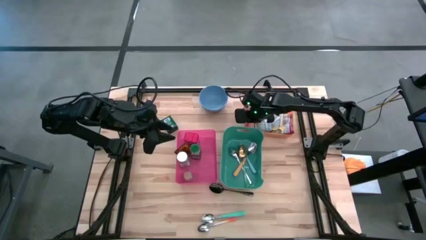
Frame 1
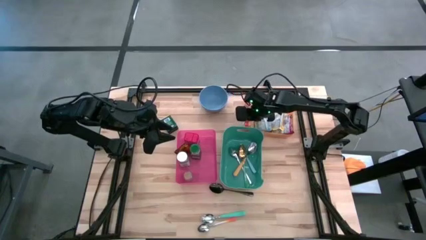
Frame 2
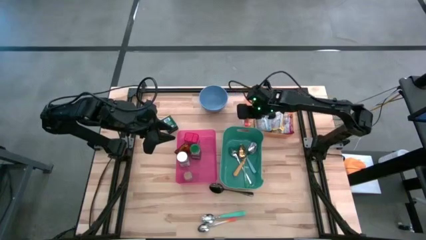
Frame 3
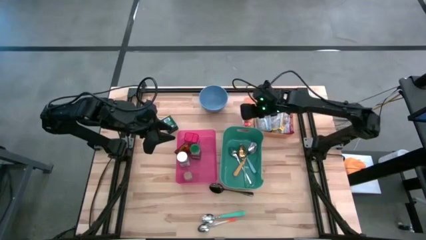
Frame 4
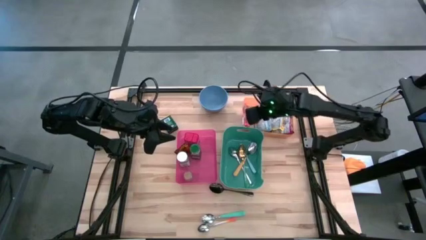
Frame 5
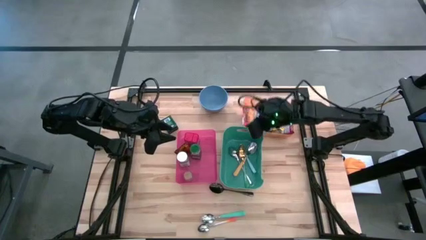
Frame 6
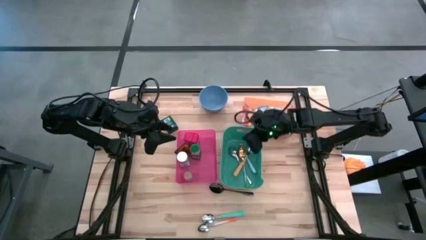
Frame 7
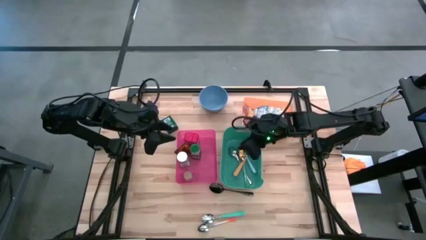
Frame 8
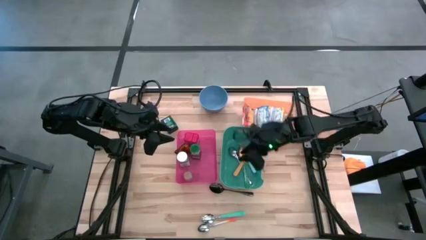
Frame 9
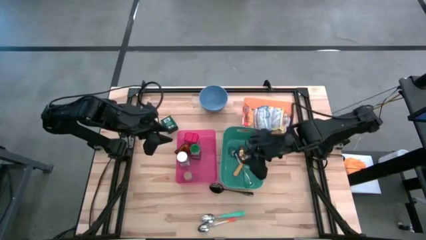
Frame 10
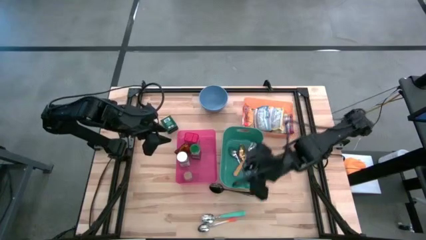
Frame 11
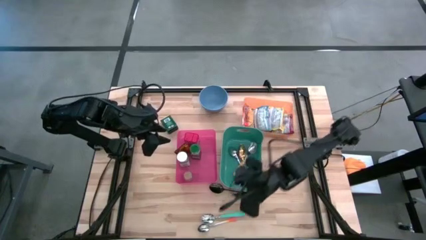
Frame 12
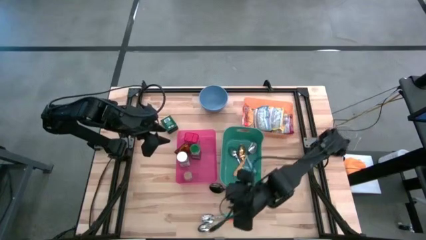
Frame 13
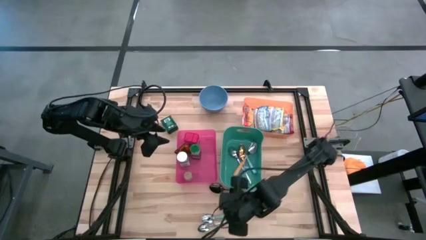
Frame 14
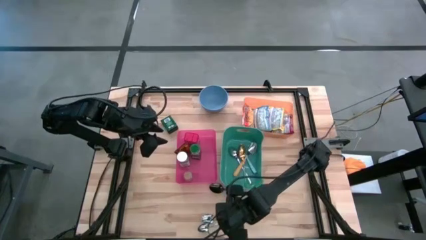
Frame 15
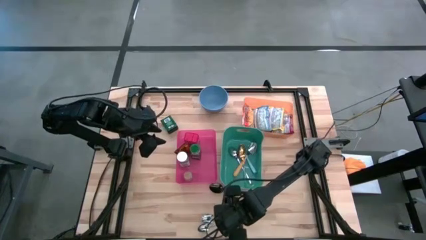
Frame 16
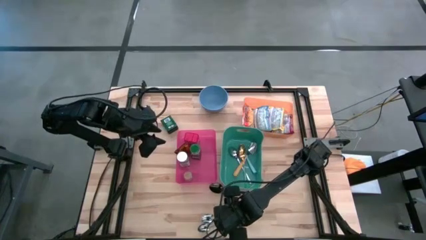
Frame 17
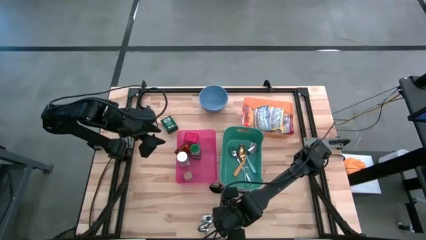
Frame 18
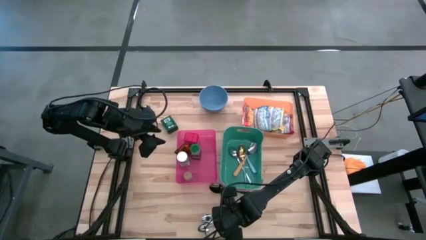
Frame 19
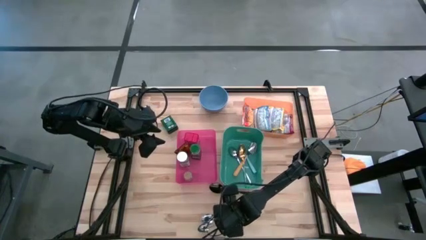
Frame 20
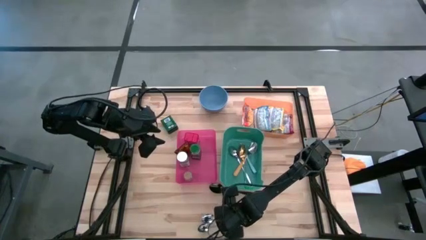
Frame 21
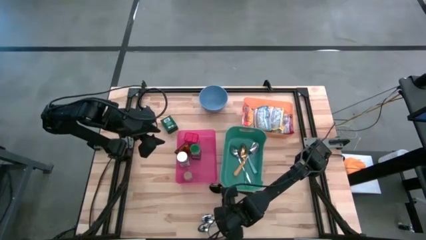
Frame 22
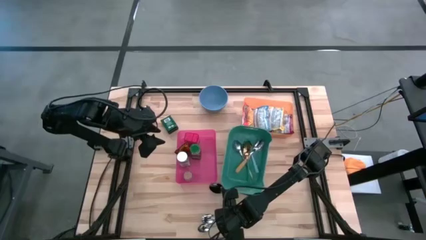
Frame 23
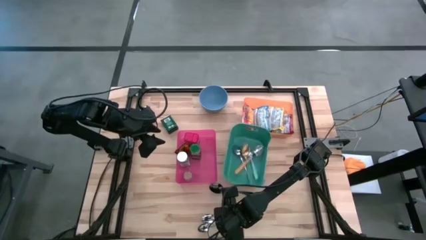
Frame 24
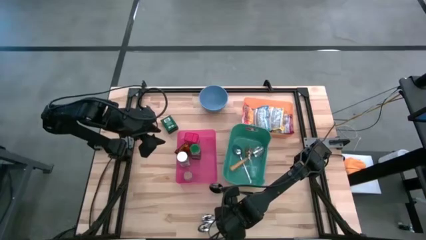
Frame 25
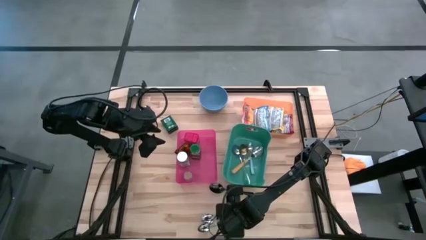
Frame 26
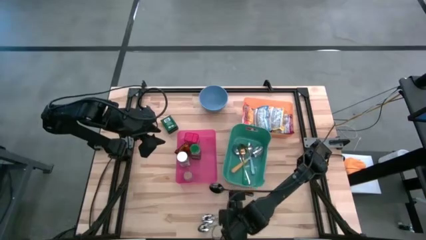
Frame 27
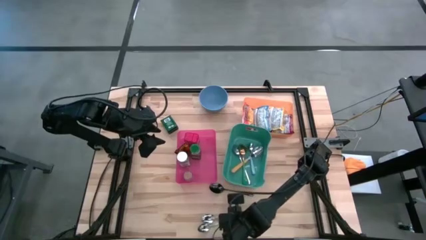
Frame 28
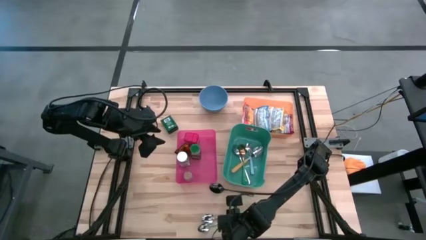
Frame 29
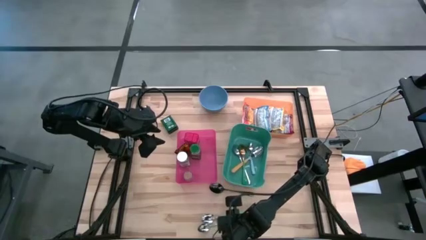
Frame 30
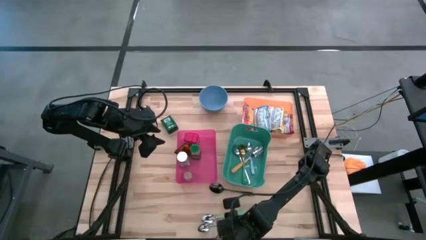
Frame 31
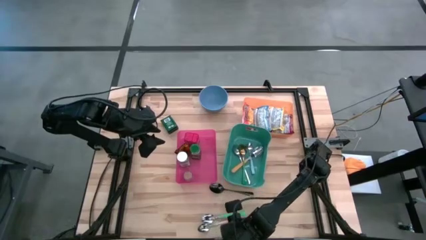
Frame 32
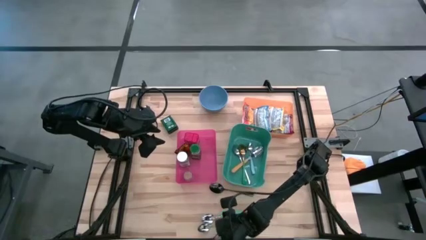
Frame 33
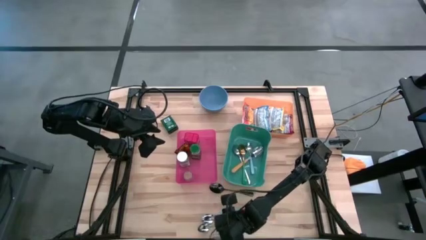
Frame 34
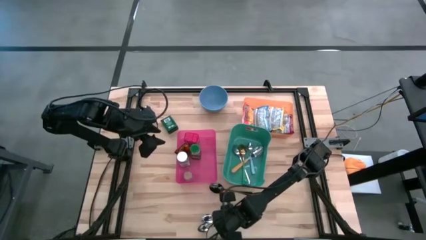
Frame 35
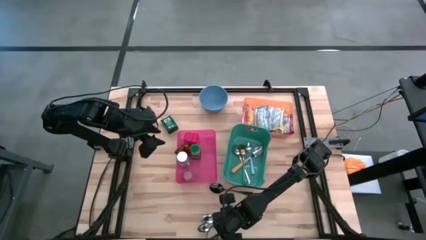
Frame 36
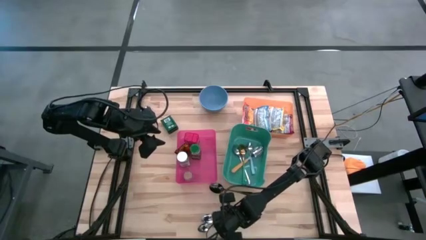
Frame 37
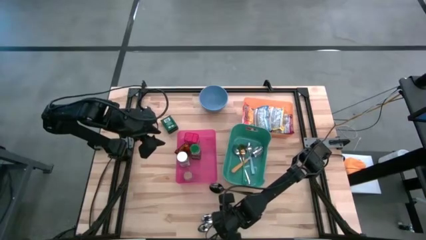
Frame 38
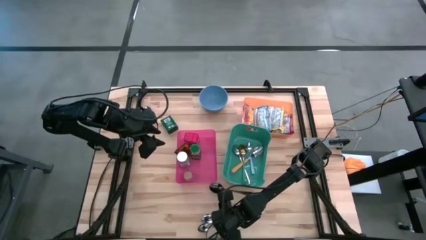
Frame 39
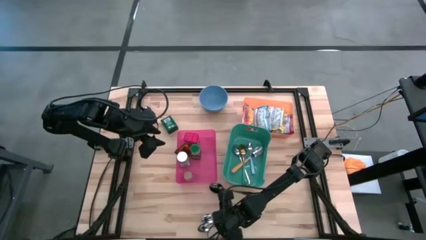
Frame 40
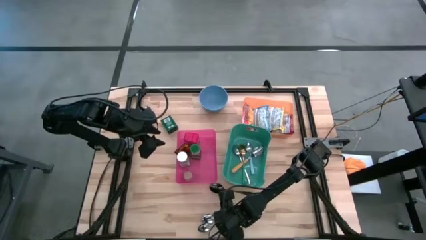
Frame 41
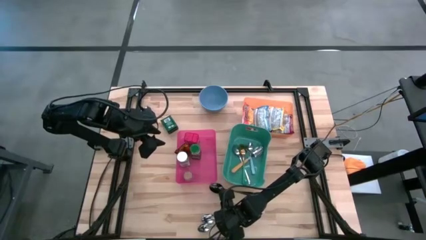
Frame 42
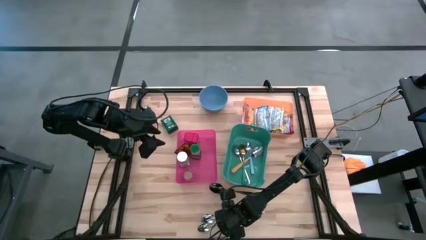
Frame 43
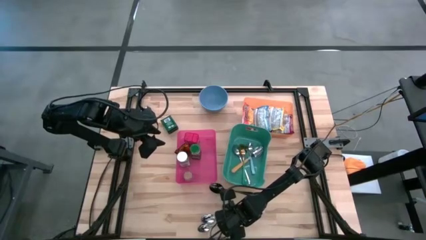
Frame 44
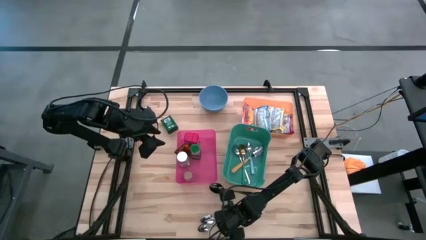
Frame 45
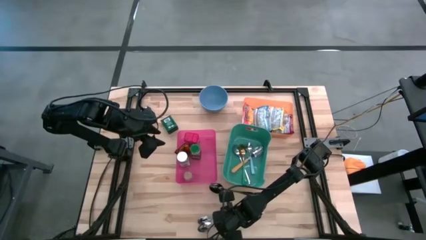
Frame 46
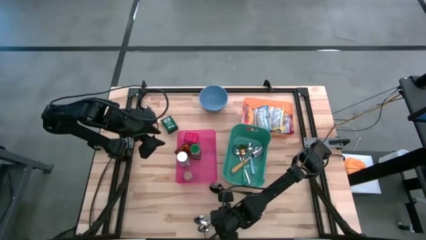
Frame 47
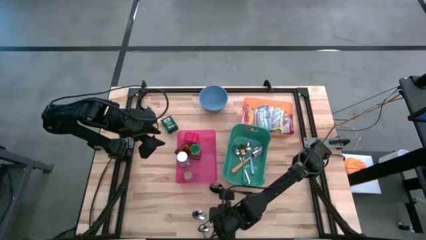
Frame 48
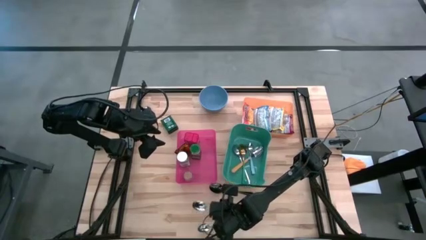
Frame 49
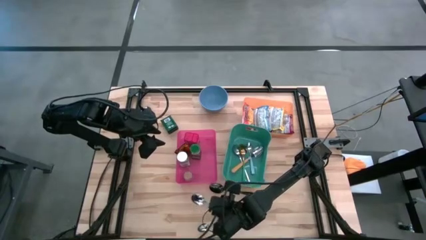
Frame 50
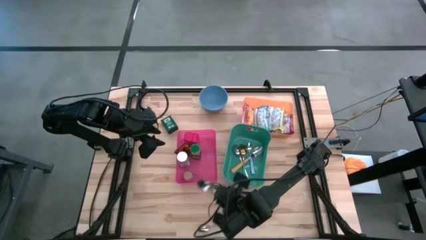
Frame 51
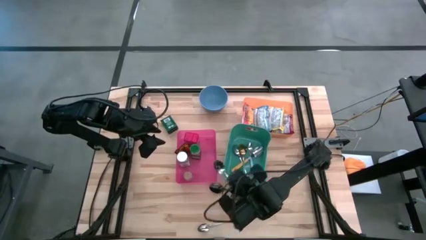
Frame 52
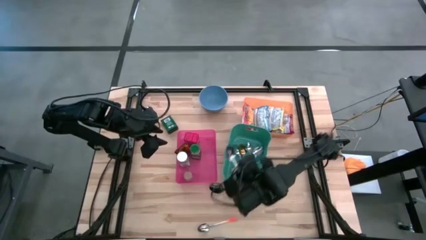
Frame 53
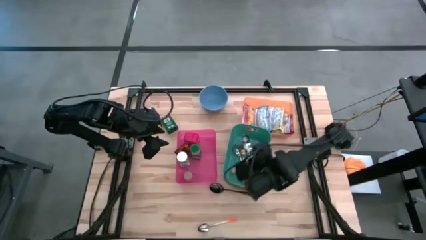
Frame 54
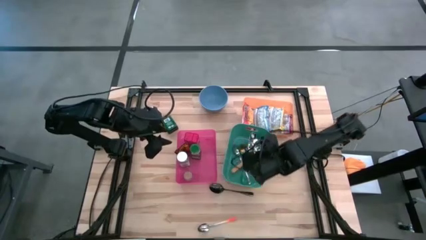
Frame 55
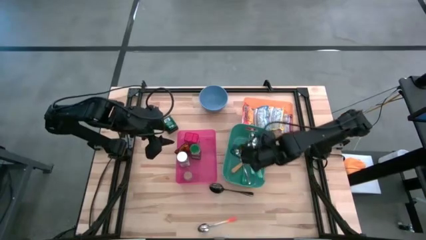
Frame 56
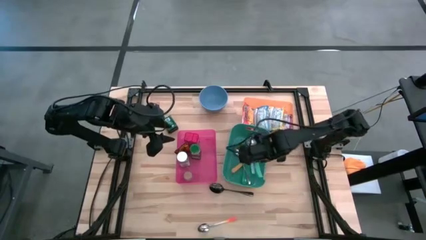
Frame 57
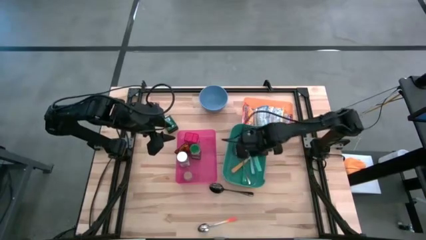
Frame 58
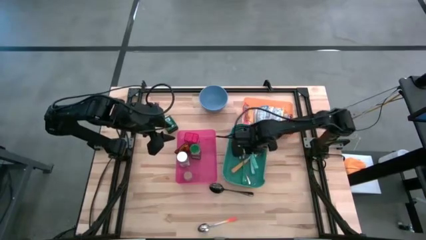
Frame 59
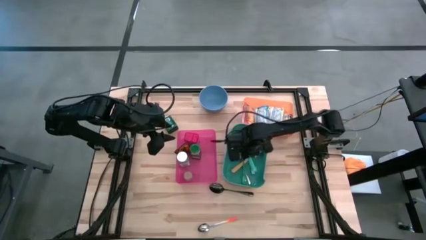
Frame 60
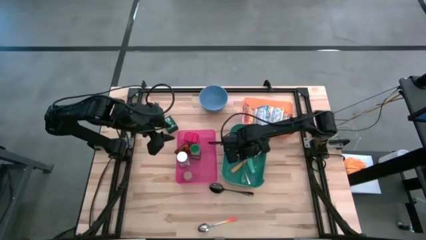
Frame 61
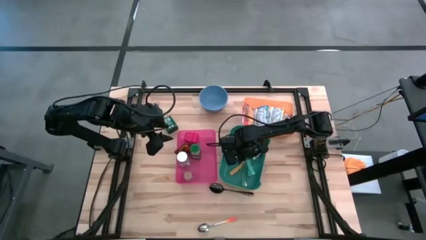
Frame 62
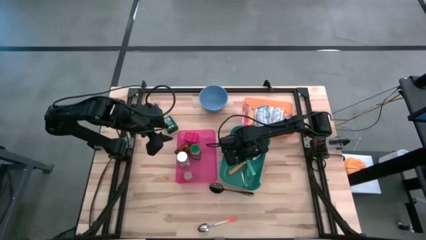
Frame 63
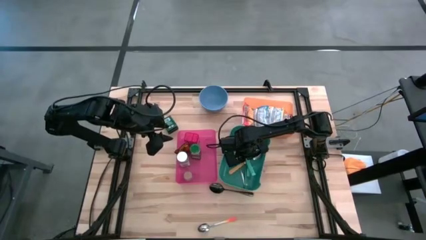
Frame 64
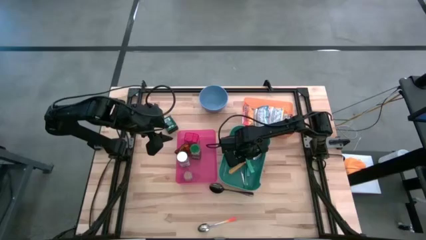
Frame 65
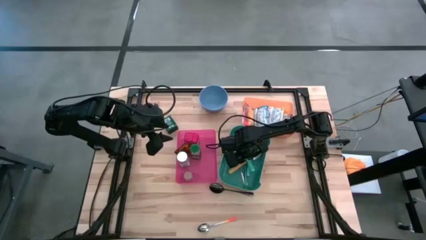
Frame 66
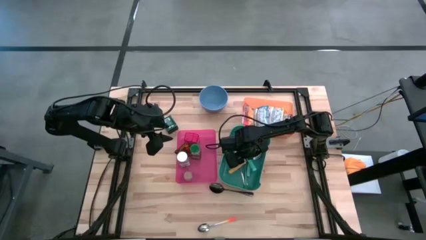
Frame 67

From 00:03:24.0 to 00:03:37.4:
Put the light blue spoon into the green bin

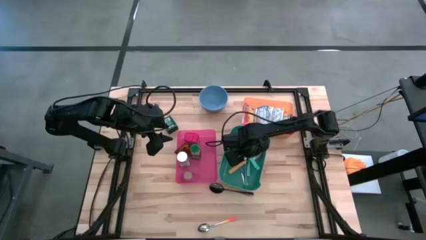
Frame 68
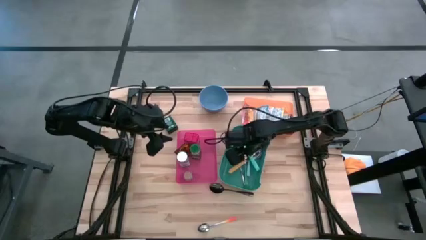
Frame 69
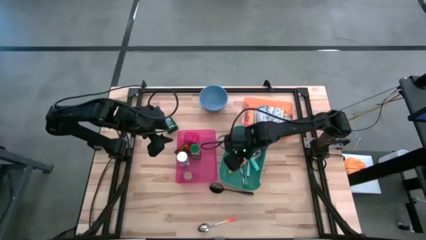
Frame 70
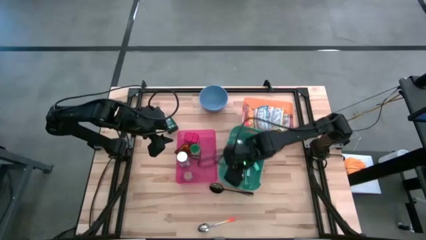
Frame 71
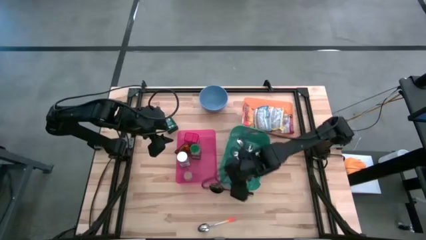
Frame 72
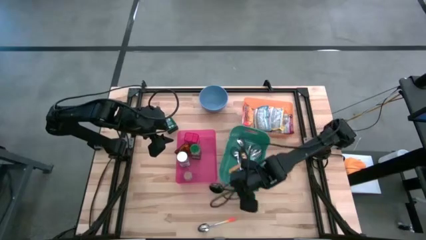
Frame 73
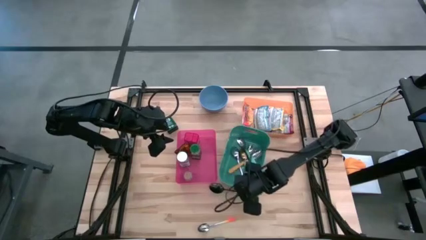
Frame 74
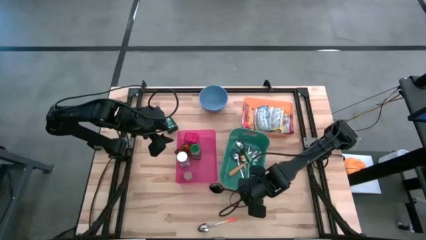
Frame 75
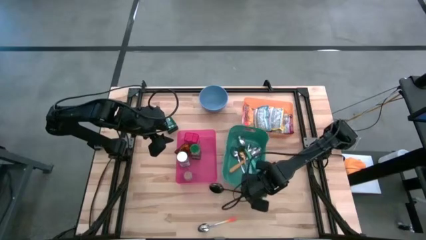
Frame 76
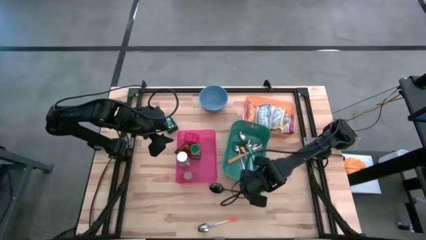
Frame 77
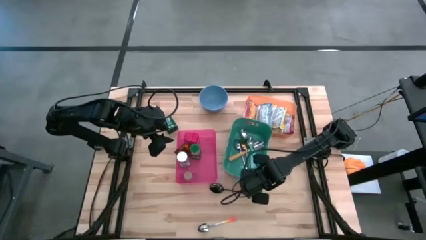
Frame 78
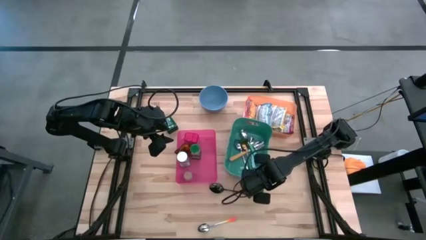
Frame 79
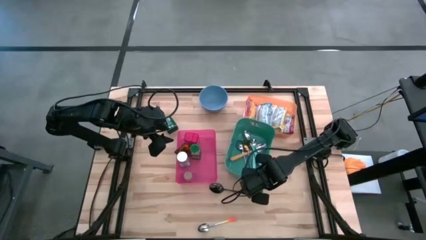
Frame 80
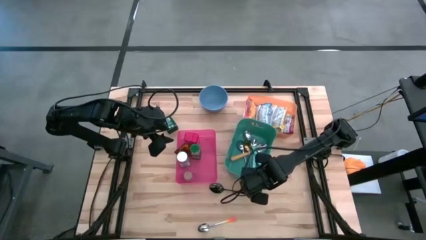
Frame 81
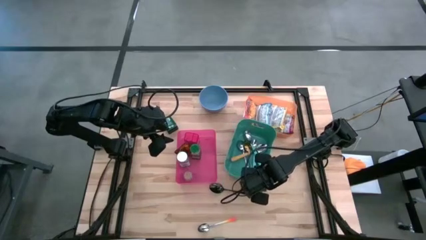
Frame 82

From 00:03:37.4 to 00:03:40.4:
Adjust the green bin
